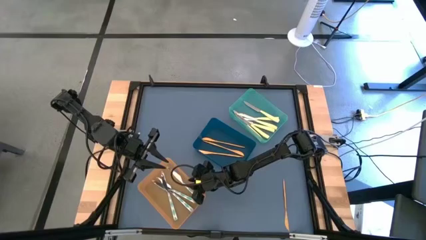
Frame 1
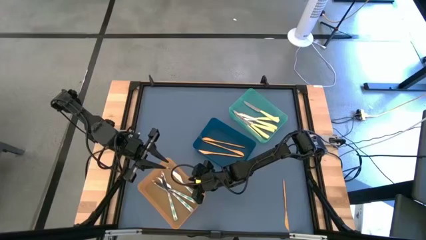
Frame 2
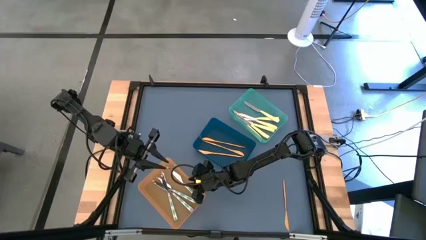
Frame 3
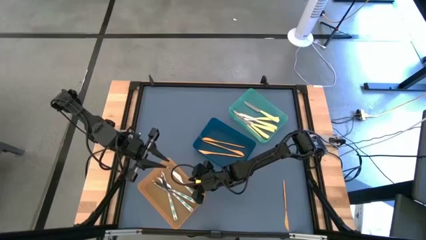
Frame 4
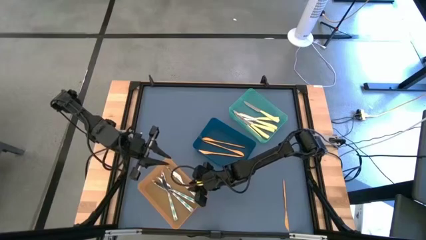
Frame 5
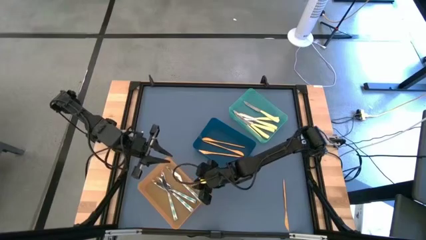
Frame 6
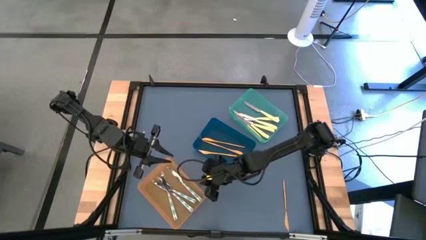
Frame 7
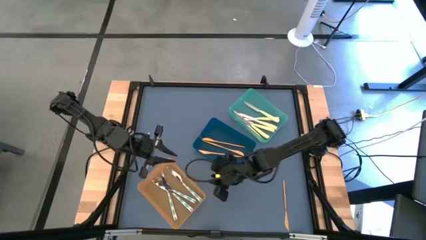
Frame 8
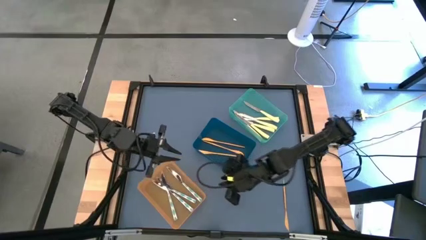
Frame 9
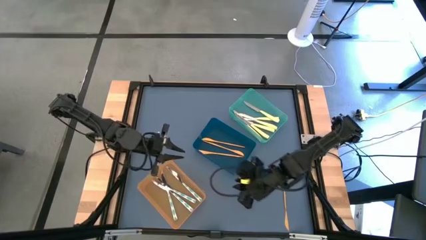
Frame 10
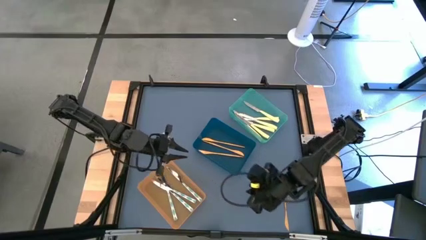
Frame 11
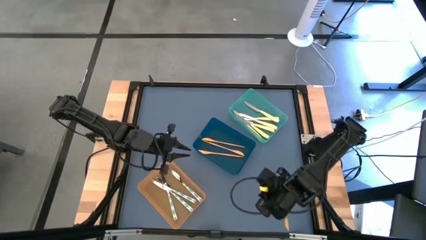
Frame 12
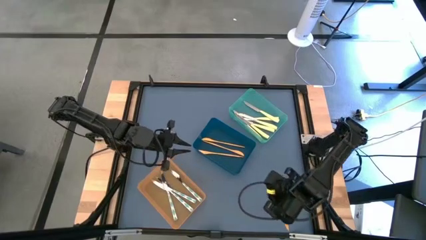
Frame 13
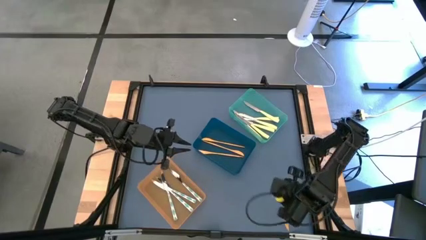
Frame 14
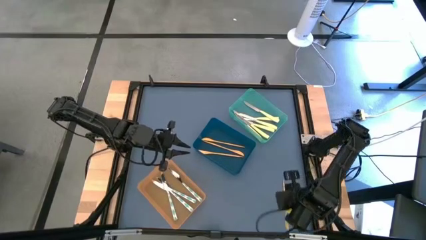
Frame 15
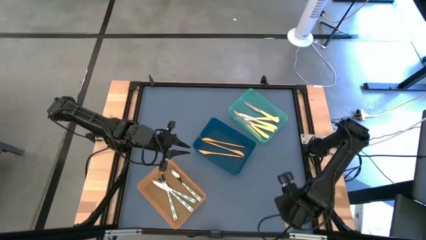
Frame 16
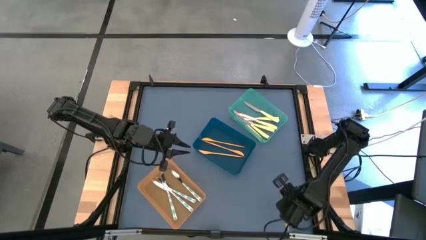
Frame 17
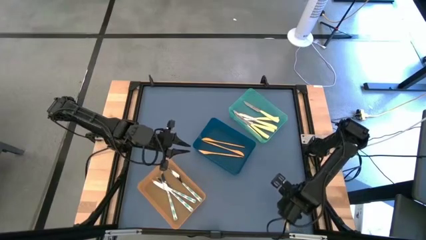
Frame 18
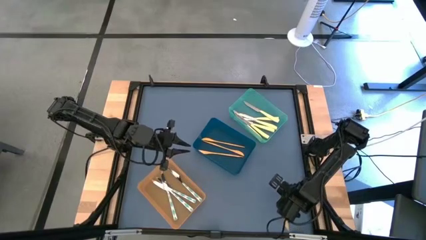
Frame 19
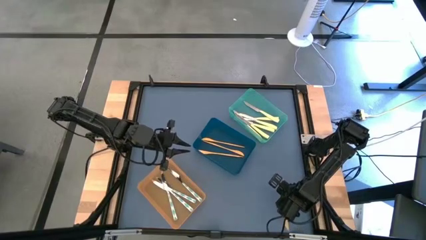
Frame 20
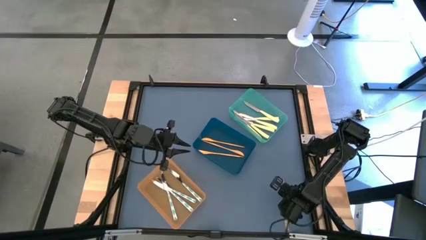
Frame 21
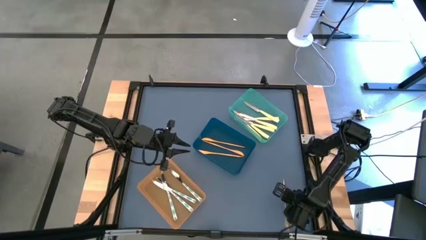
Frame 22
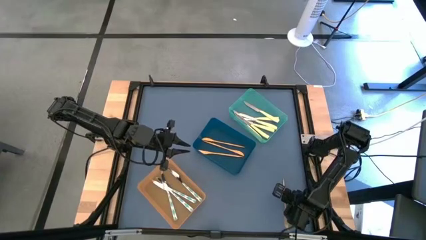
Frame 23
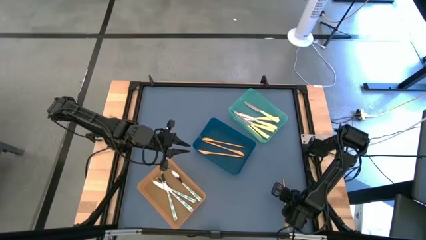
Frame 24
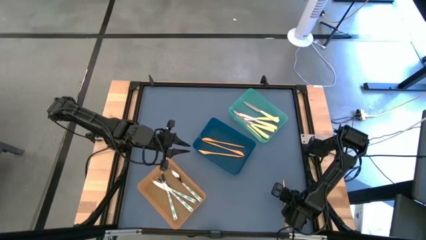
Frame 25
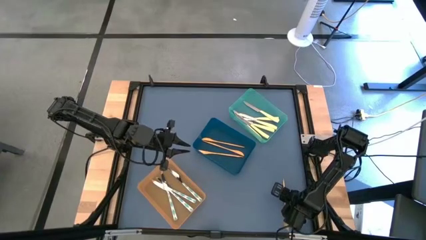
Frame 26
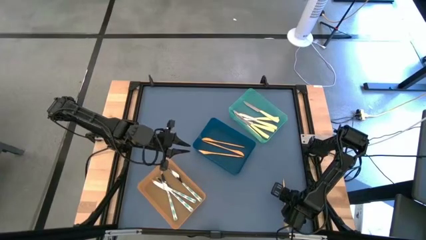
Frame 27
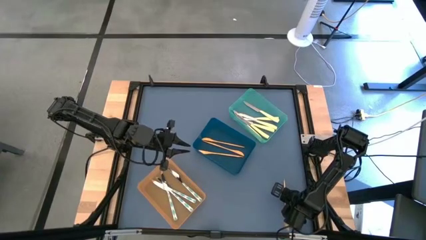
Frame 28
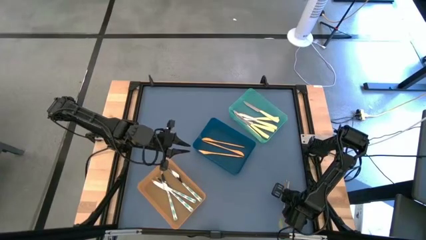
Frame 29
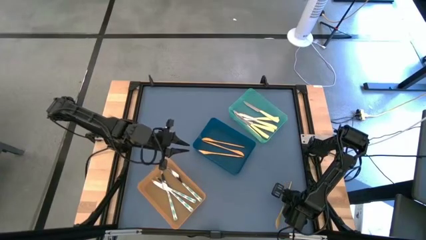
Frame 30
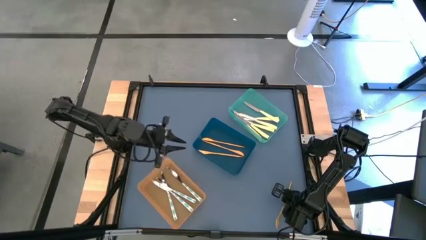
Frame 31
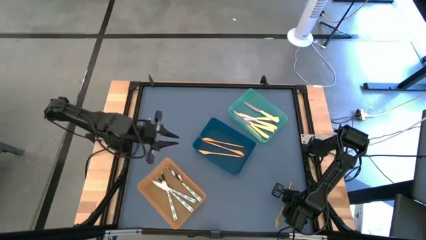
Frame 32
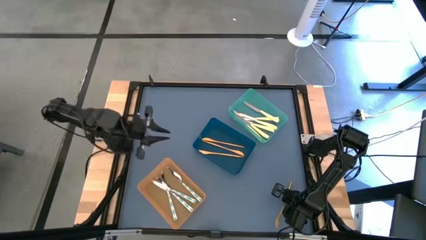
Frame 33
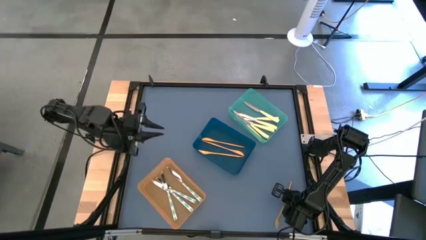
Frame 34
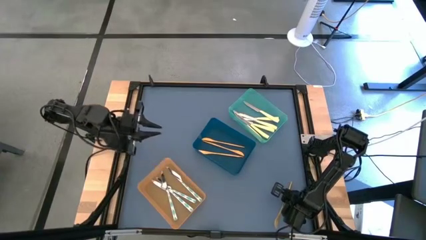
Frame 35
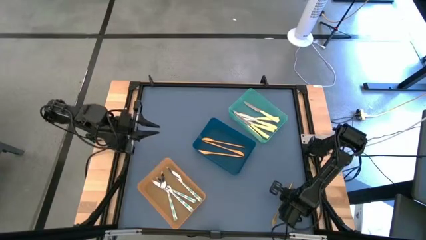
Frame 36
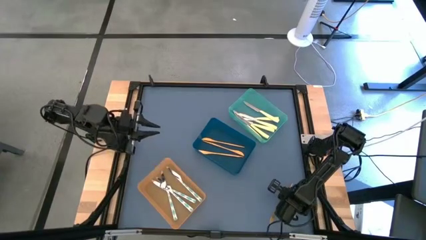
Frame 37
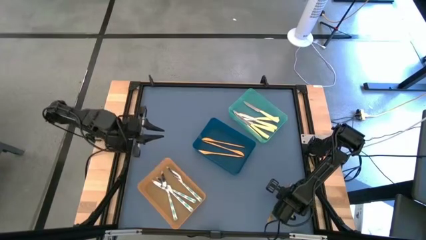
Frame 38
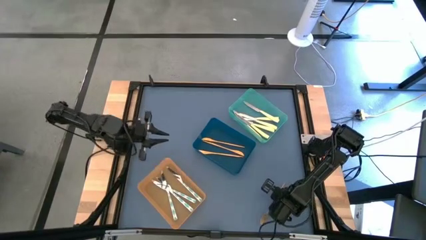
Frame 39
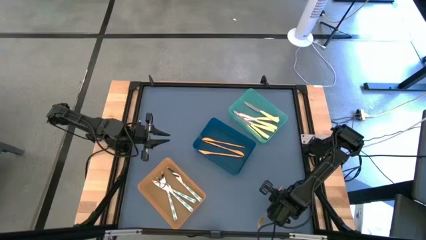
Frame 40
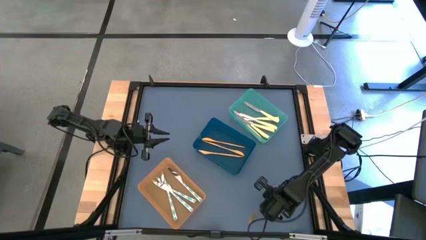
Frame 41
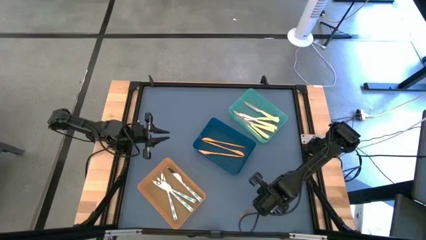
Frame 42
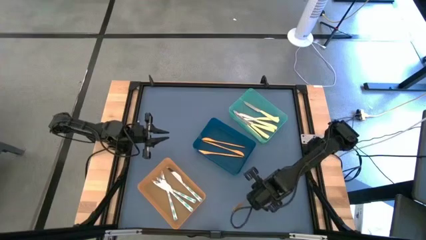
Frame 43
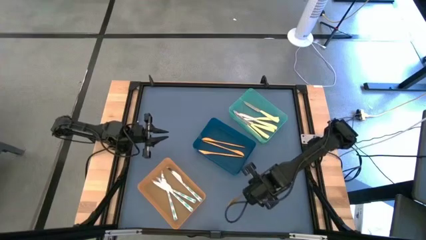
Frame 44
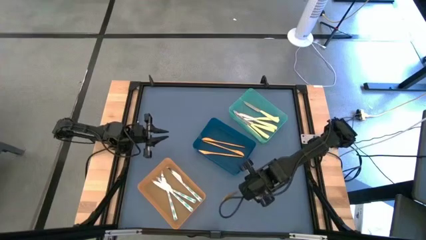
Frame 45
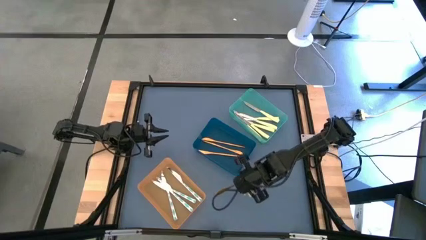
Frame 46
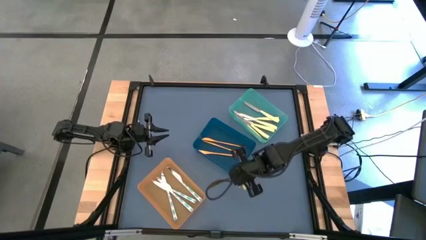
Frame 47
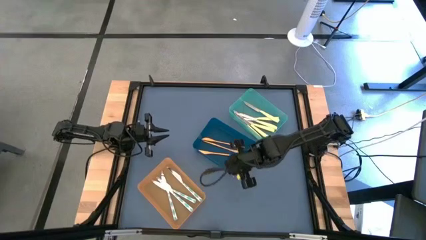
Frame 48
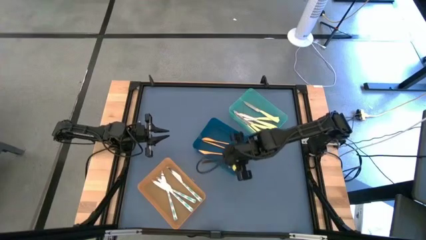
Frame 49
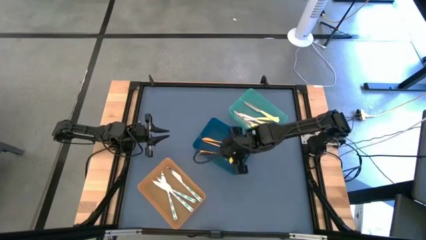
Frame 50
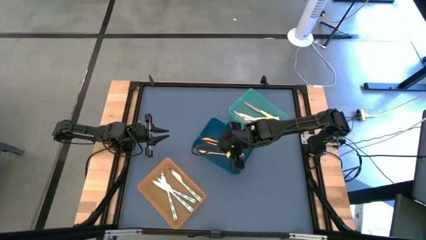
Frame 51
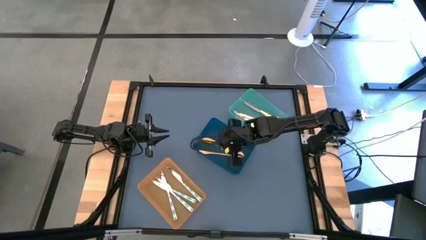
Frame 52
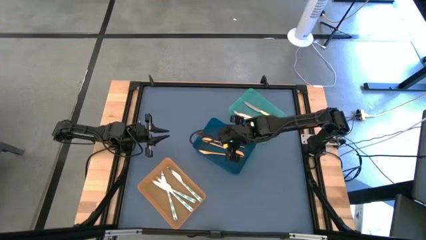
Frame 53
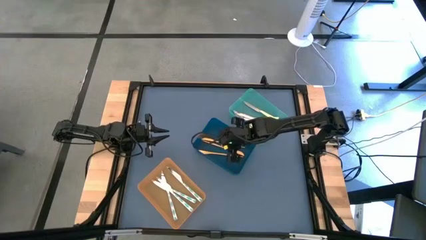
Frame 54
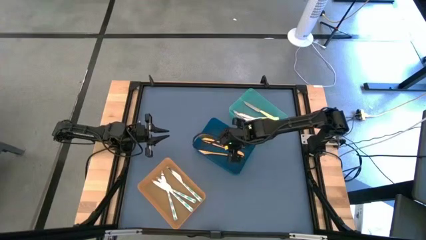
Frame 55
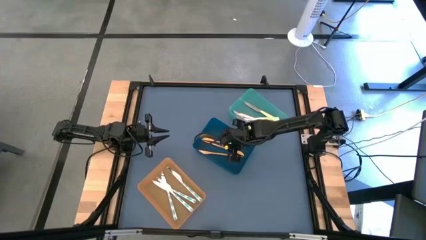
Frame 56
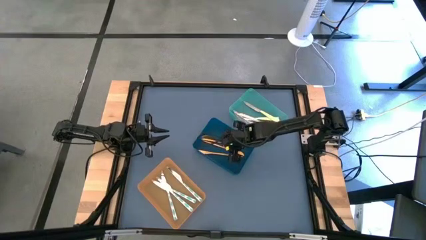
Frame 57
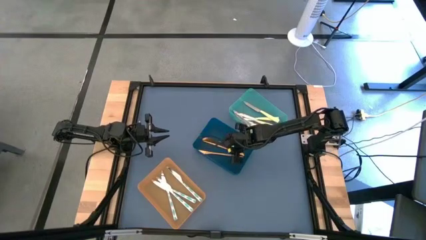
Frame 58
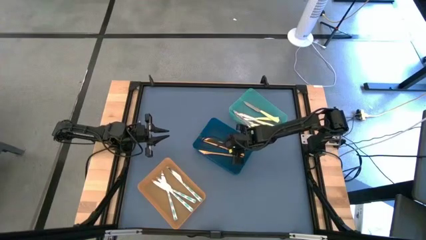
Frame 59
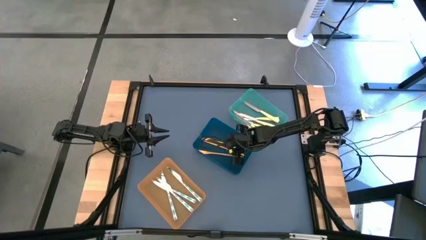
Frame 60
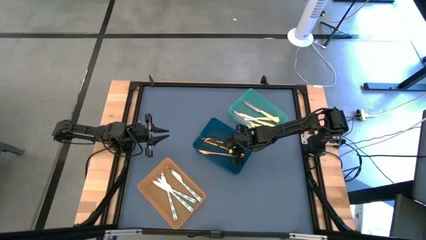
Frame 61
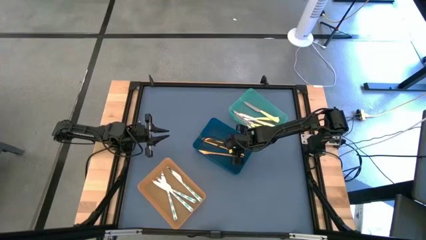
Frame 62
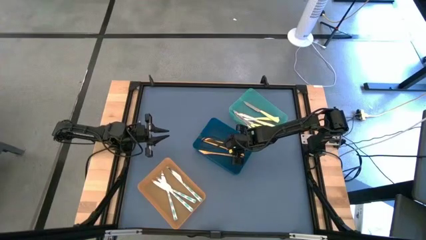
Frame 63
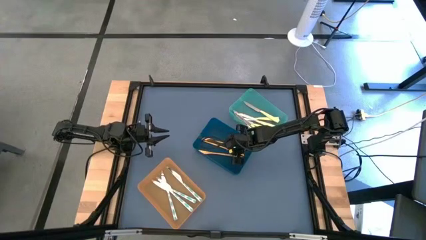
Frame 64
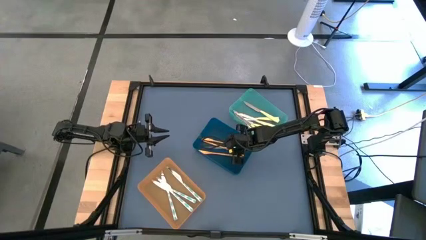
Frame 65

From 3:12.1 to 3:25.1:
Task: Sort silverware by color (type)
Put the gold knife into the dark blue bin

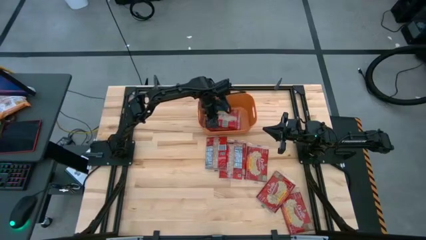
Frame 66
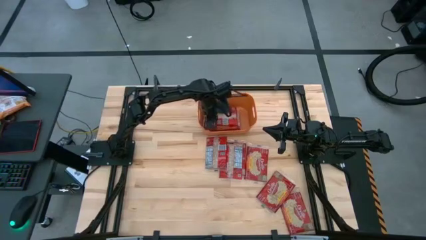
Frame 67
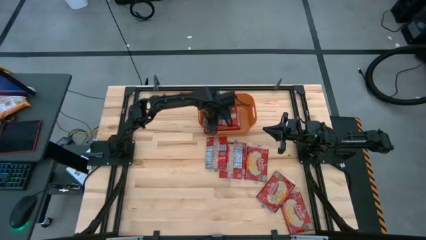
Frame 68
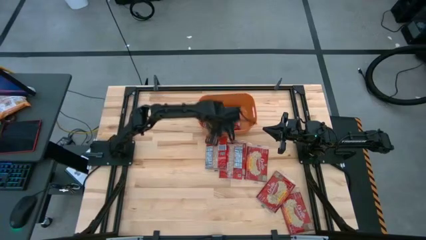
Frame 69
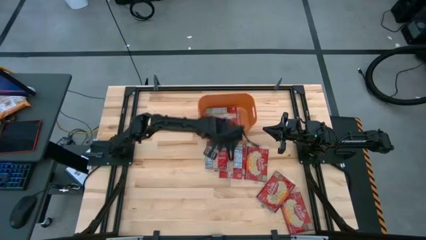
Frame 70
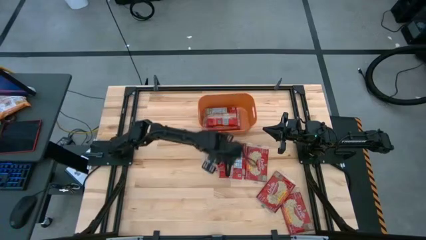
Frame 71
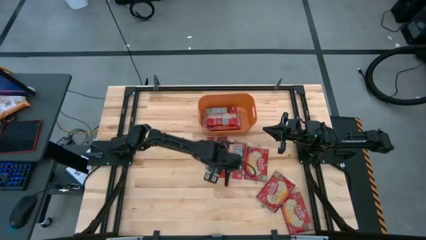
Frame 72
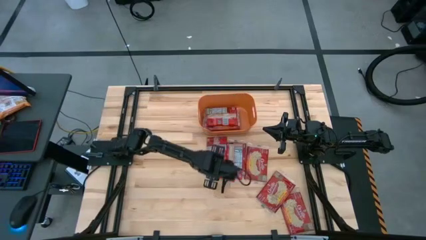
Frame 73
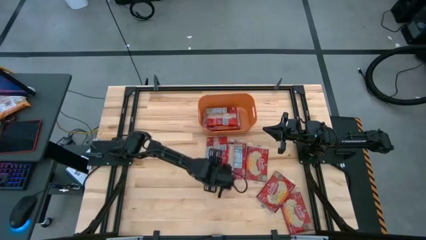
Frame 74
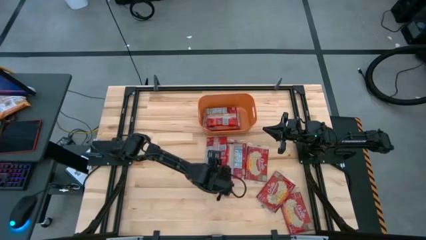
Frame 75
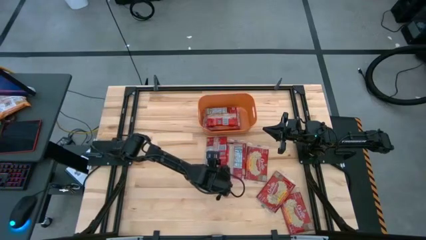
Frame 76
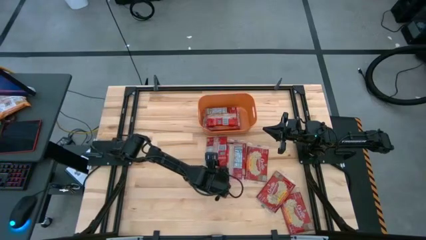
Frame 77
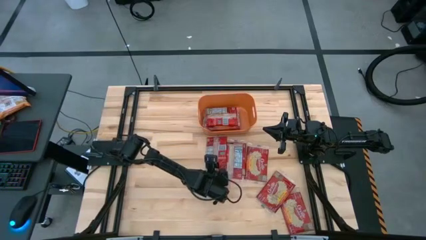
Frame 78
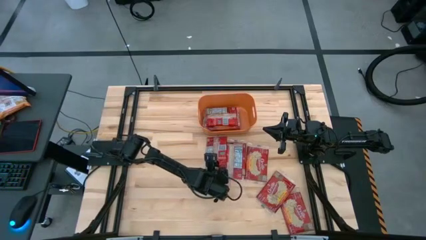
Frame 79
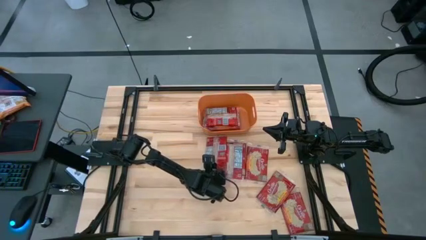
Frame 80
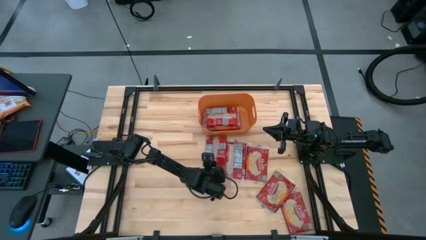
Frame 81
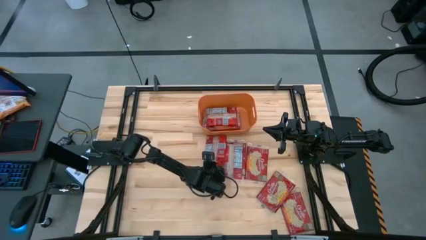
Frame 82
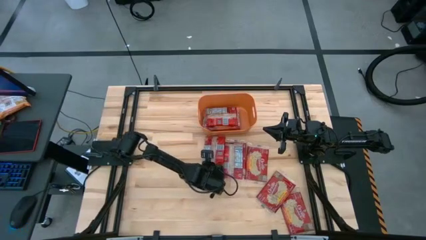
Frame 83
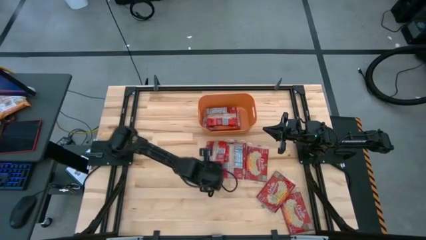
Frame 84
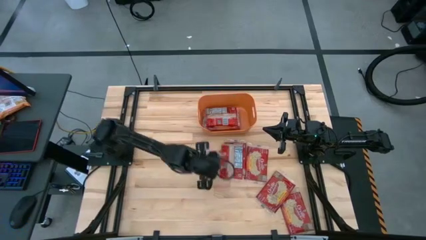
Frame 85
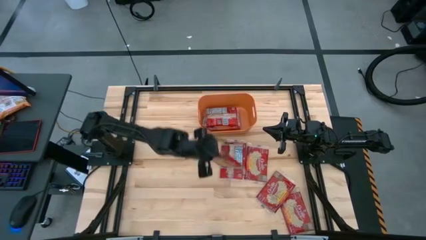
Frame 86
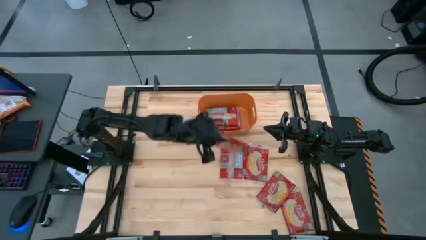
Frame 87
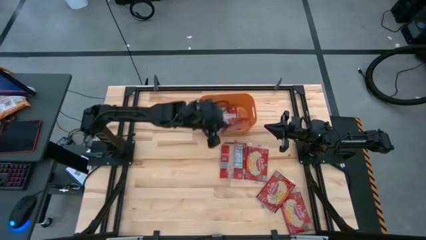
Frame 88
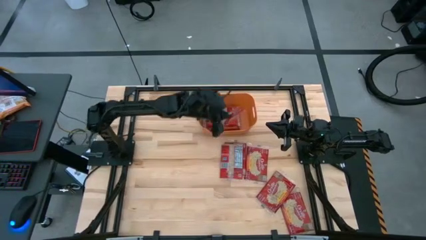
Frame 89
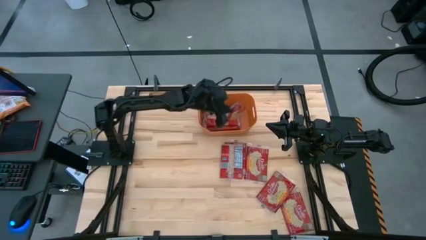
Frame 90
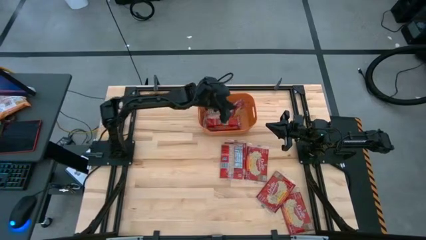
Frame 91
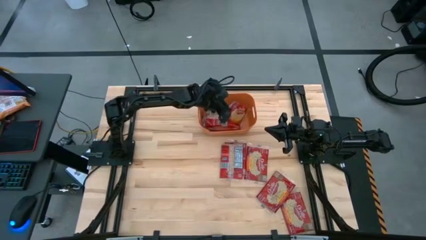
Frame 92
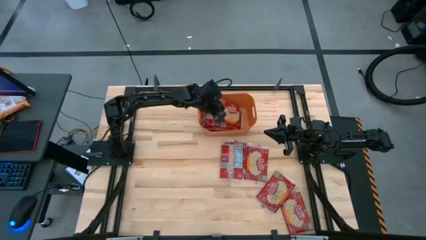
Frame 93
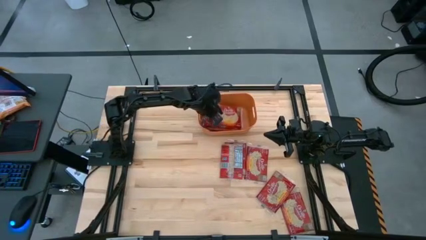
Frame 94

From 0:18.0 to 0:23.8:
Task: Sort popcorn bags into baskets
Put the red popcorn bag into the orange bin
